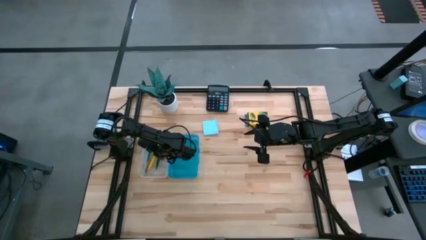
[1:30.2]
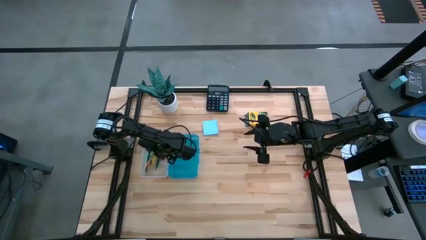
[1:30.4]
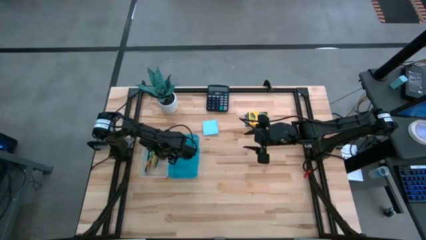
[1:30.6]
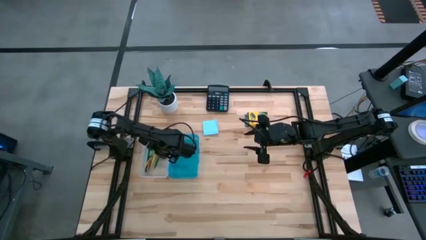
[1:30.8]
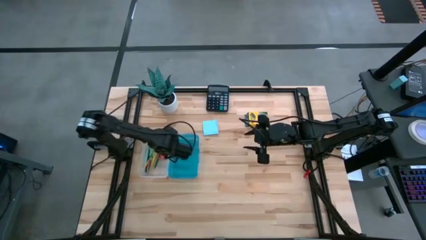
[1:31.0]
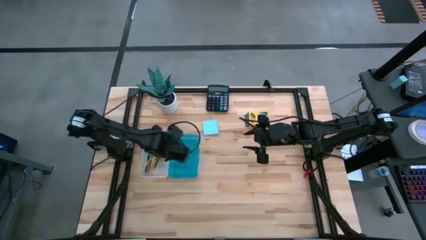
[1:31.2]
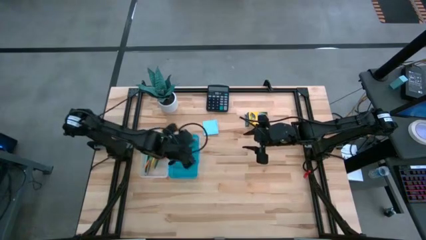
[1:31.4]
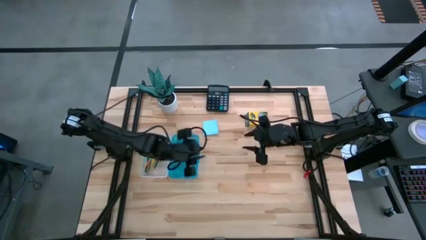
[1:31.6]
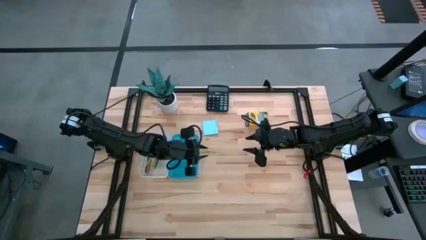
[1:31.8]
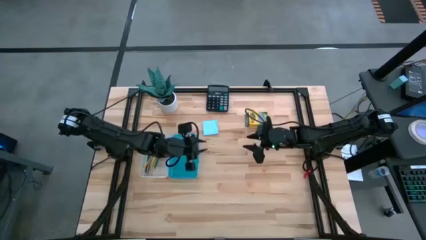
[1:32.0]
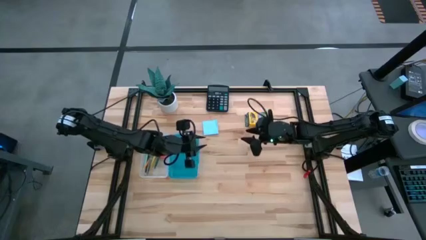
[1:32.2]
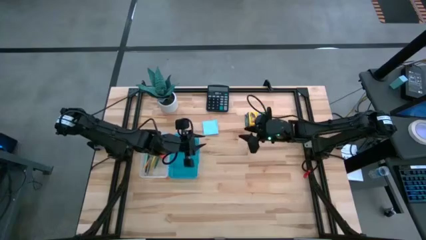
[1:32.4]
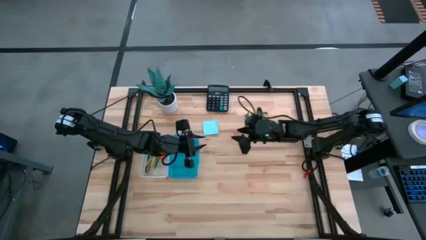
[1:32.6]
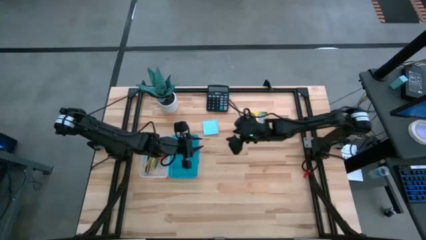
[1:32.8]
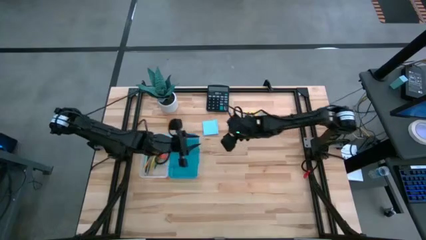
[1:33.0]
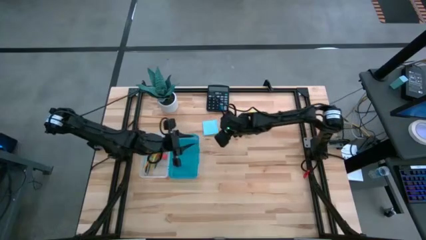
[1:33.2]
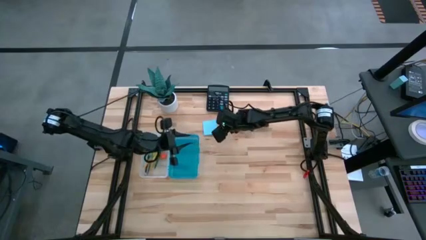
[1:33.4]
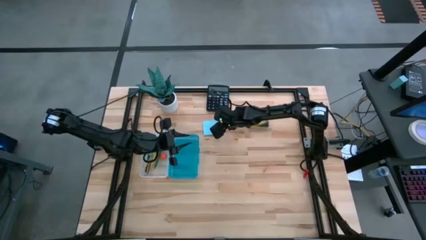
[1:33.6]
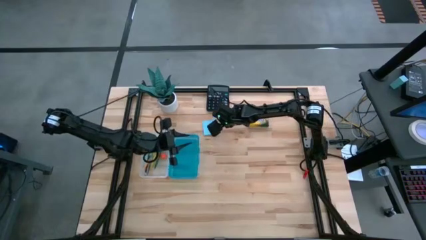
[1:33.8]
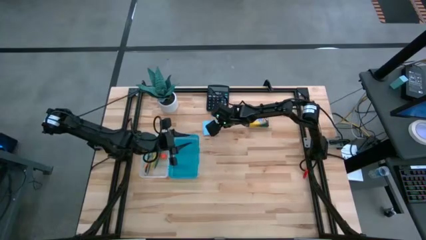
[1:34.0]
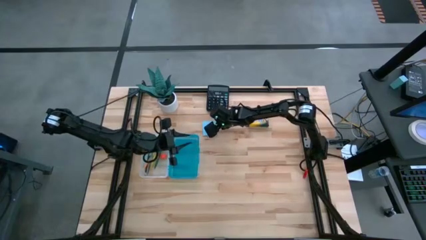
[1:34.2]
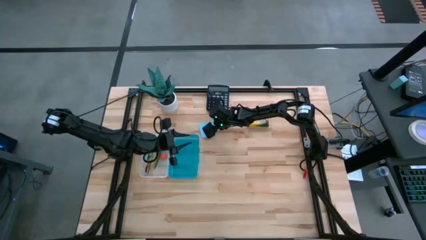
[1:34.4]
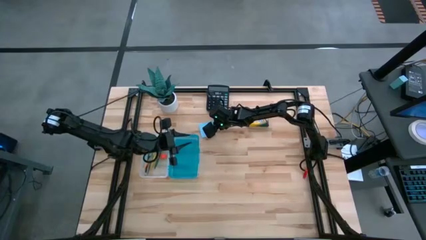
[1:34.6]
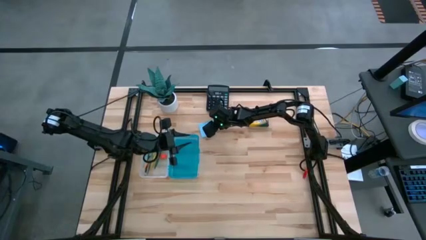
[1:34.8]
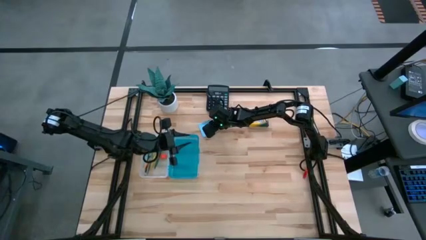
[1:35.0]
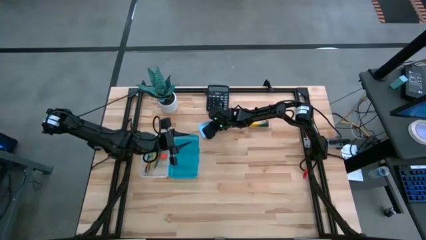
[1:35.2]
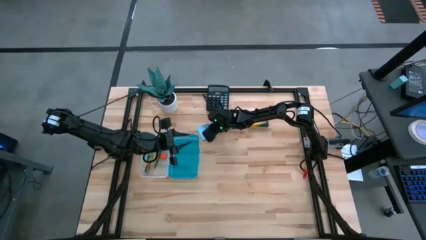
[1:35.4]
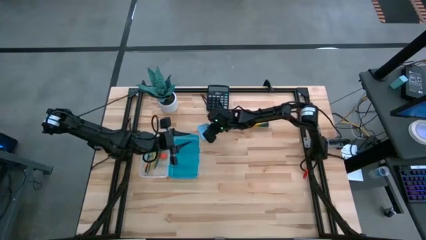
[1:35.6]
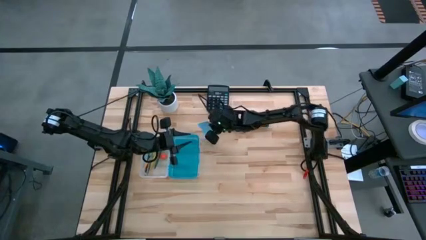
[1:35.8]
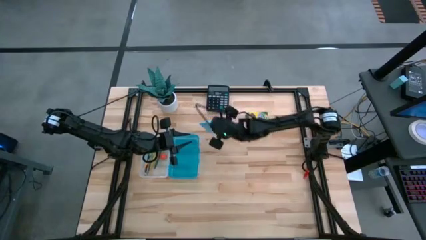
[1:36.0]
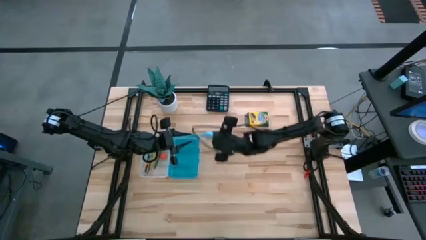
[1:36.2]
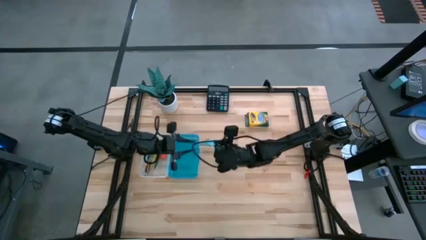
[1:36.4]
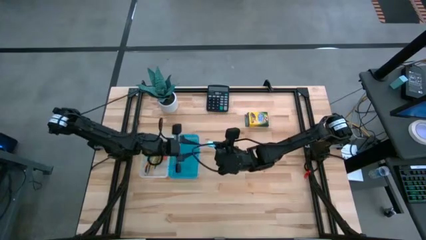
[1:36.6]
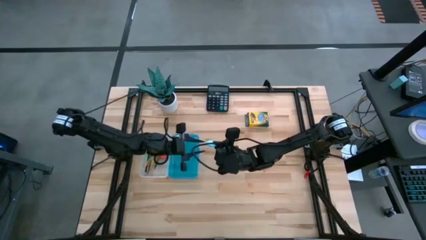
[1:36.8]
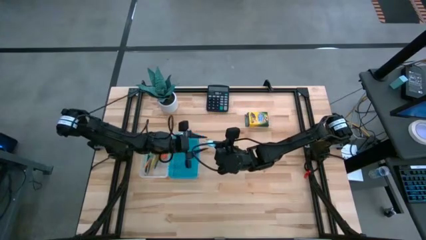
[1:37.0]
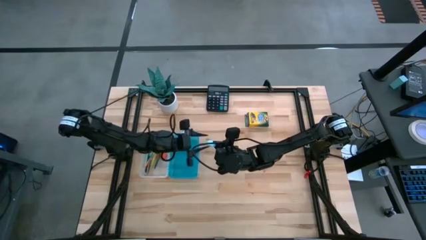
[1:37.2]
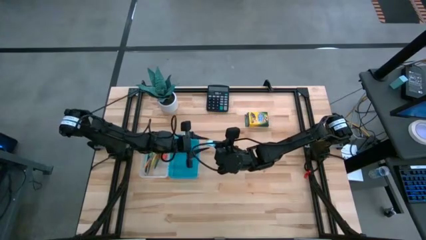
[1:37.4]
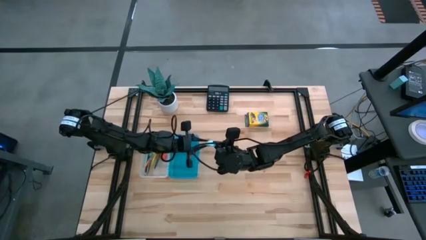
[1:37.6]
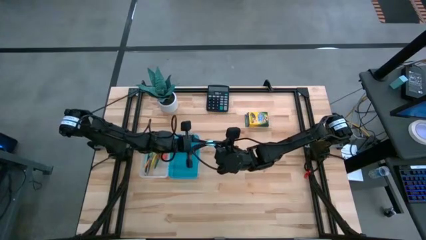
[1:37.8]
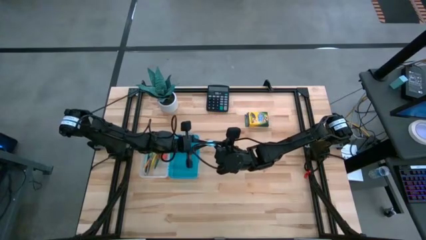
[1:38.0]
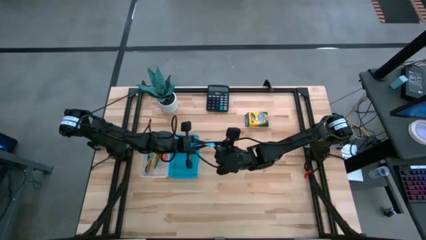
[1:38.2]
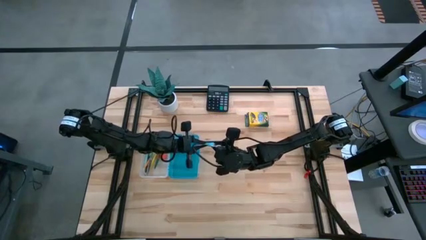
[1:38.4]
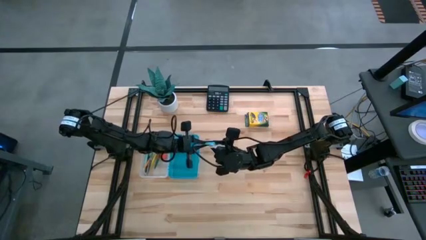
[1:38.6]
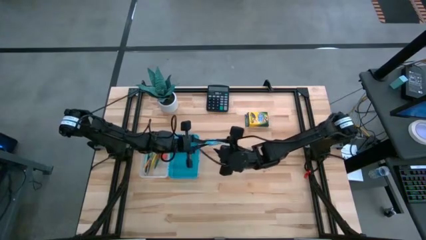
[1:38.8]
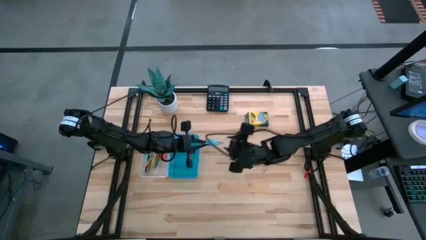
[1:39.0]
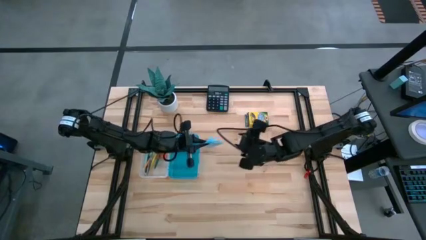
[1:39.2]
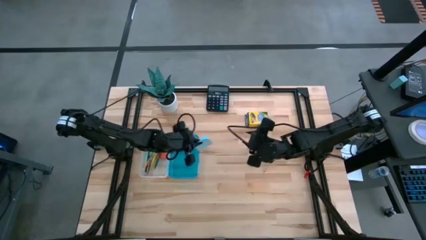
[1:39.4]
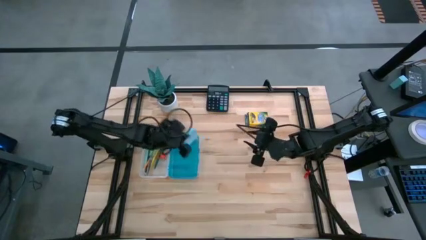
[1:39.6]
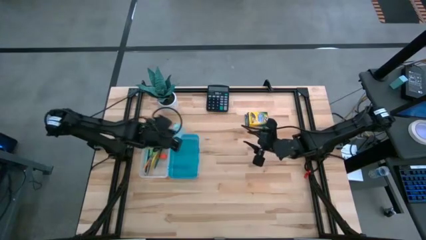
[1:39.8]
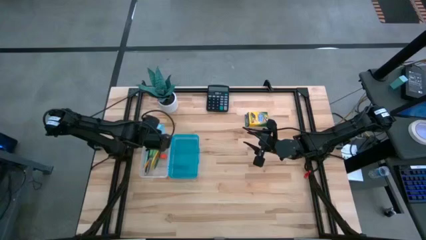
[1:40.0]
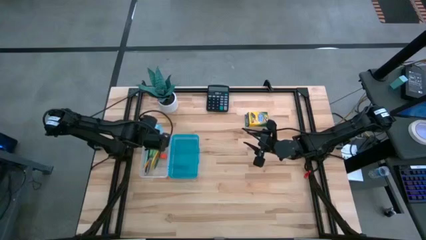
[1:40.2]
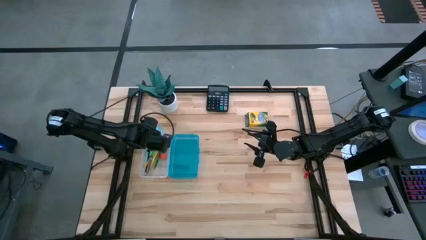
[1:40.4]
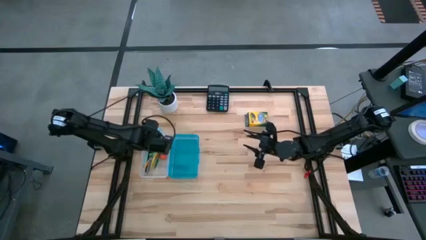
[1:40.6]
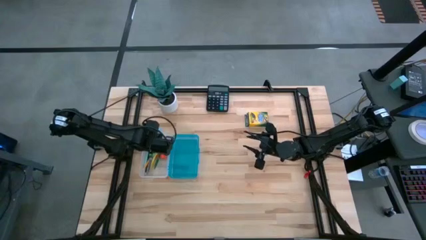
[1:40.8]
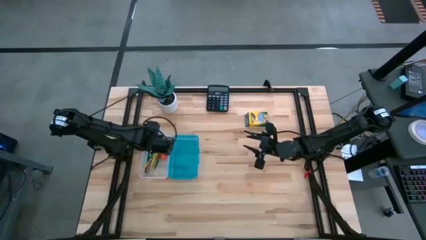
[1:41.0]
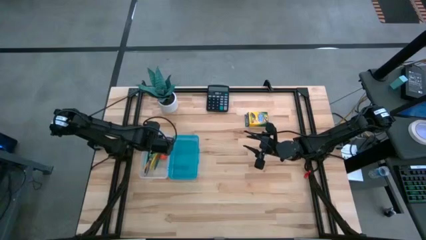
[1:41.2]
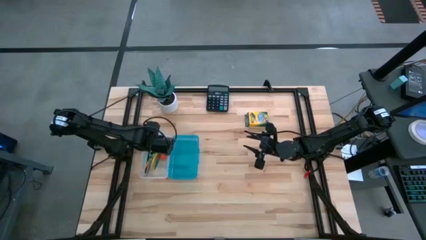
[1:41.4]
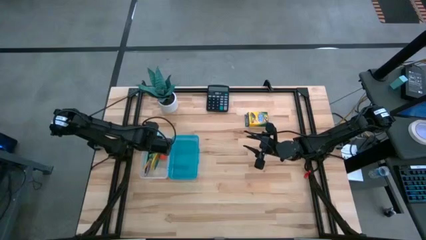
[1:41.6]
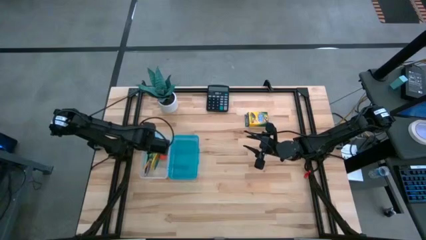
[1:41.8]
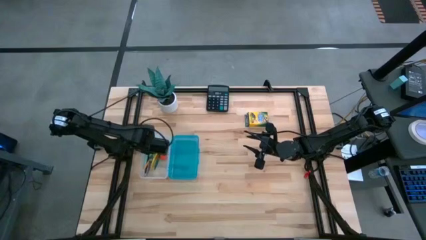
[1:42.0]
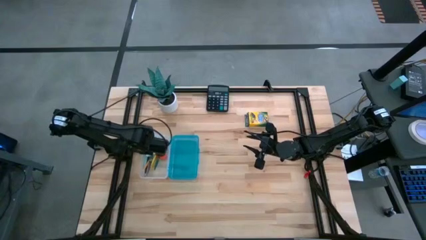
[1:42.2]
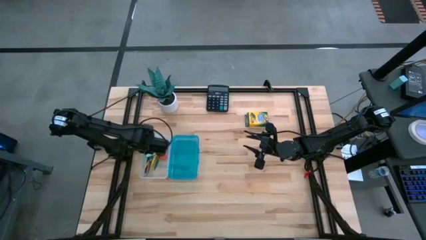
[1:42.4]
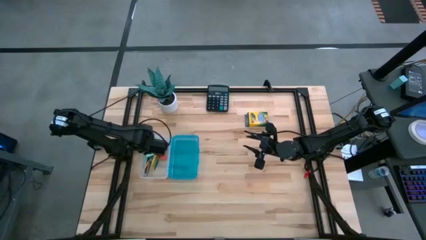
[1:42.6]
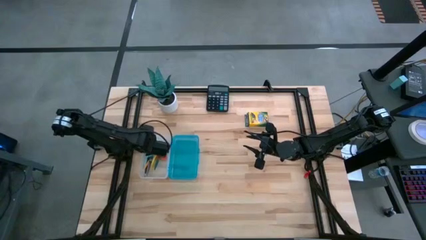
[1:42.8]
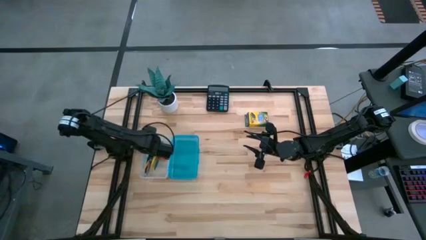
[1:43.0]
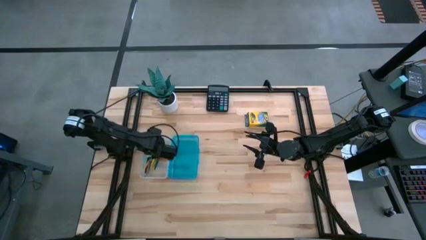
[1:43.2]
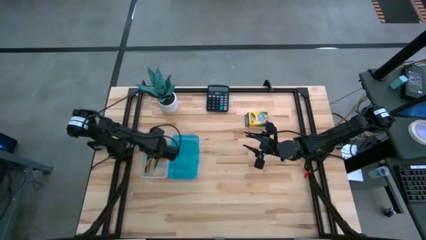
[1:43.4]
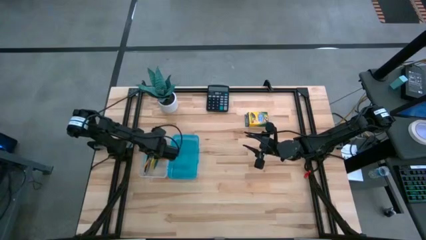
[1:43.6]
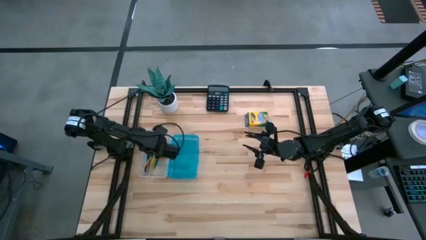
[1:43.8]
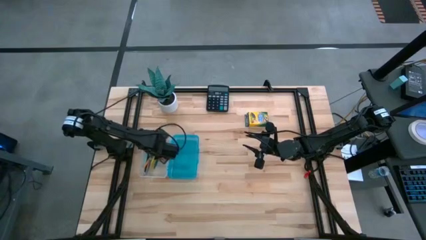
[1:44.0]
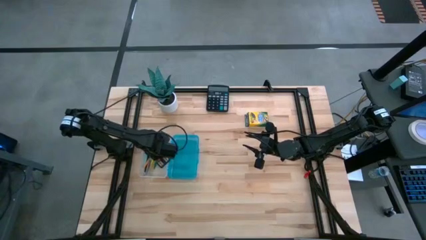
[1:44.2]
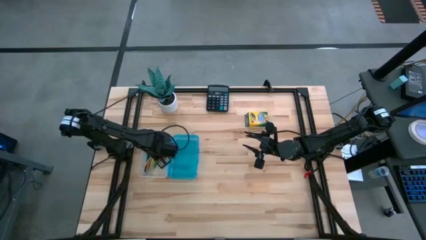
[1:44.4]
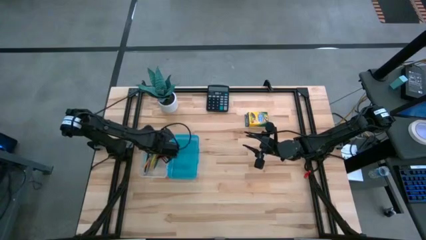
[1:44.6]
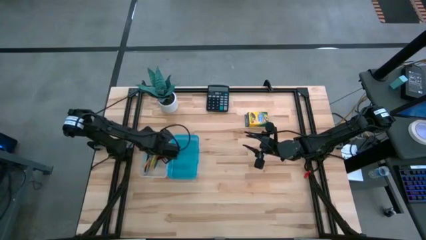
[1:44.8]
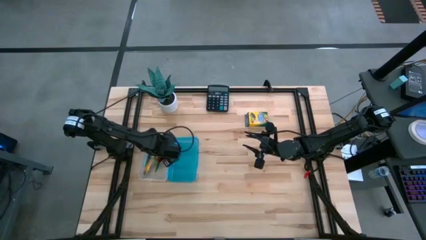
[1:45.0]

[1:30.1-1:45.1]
Task: Pack school essentials
Put the light blue sticky notes into the blue supply box
